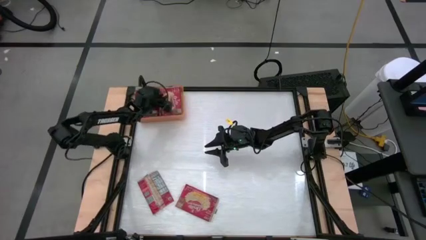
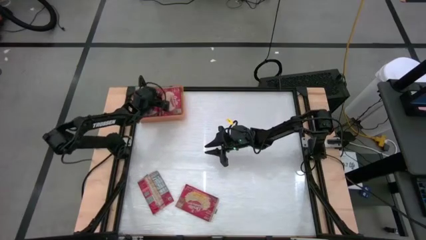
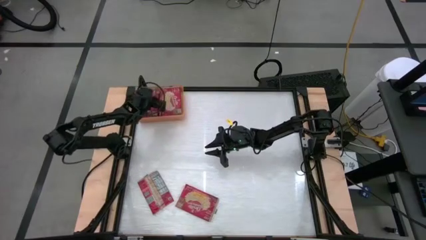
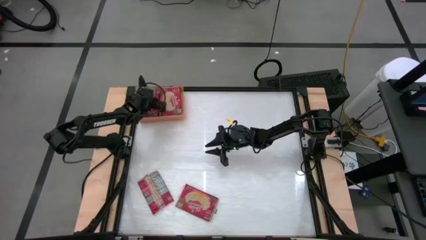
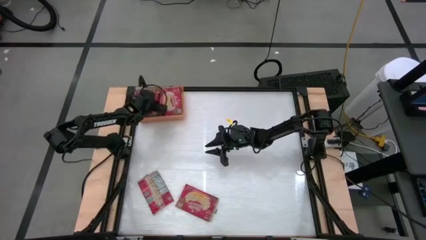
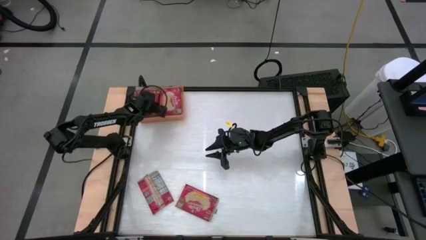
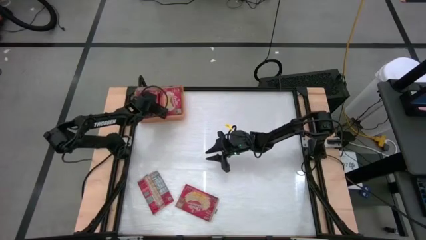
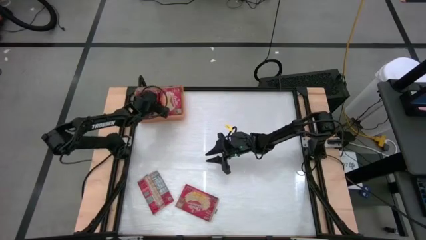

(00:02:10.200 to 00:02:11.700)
Task: Sort popcorn bags into baskets
Adjust the red popcorn bag in the orange bin

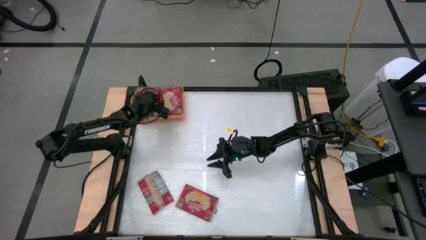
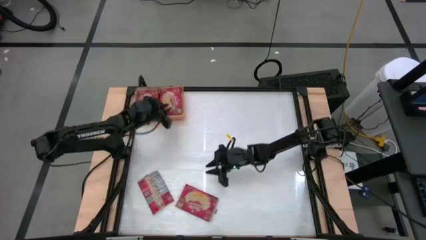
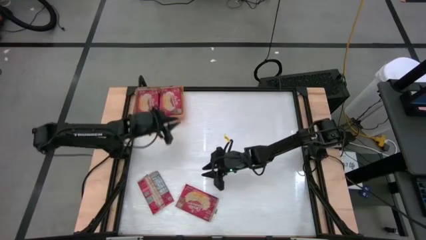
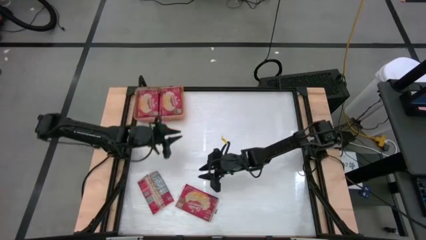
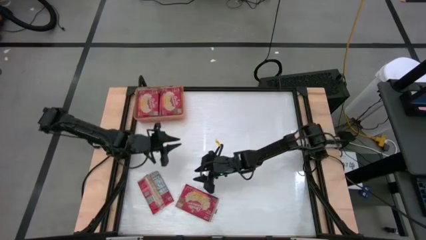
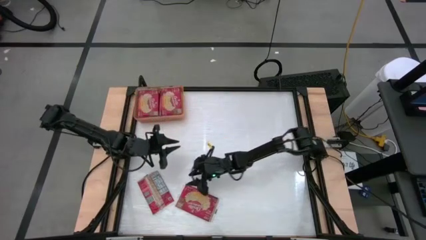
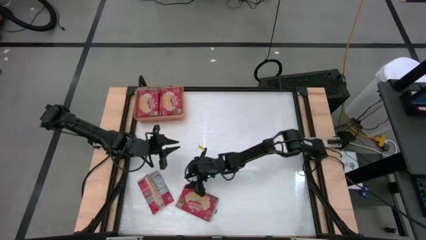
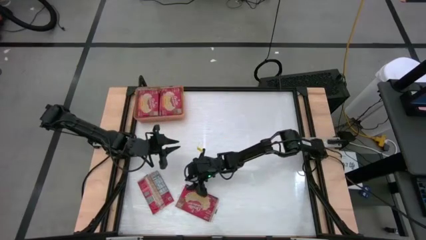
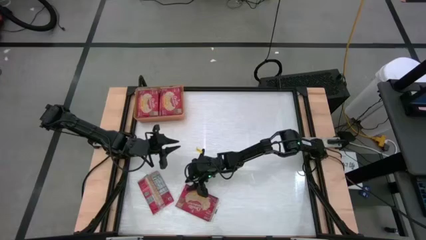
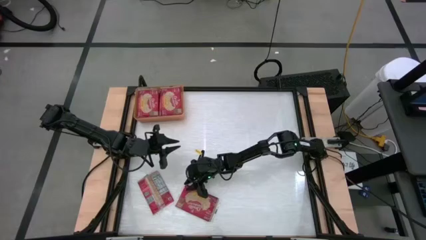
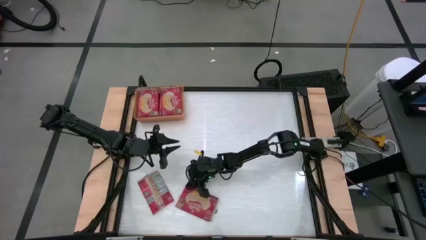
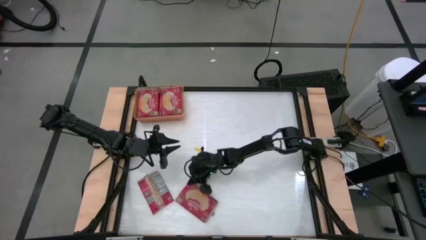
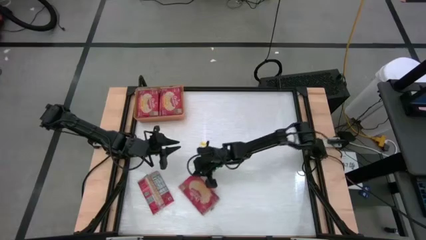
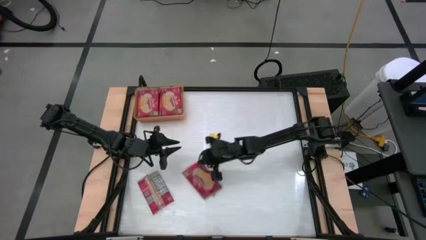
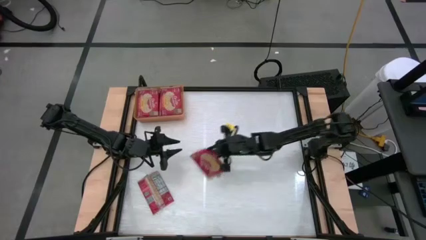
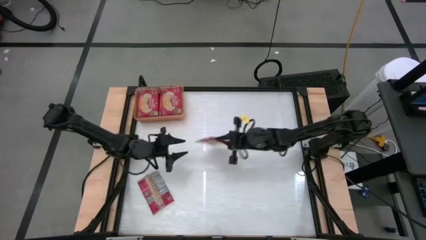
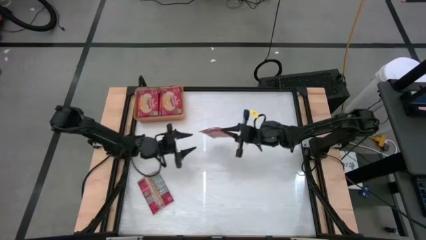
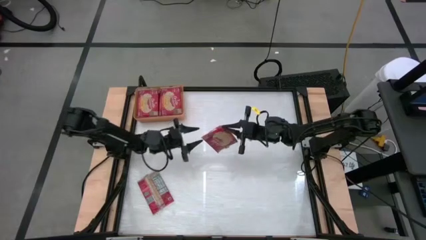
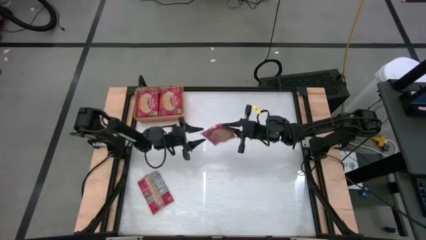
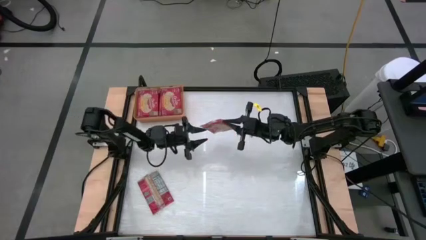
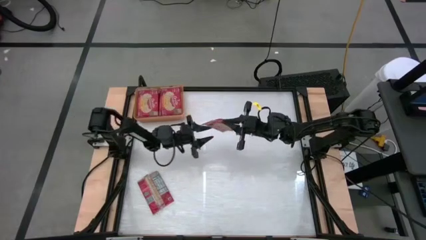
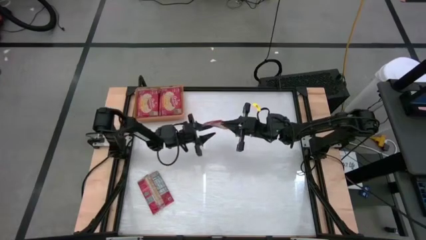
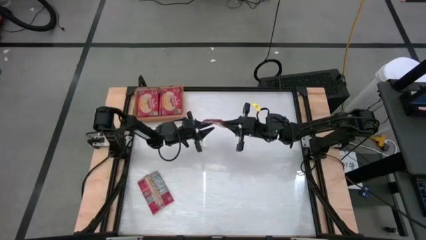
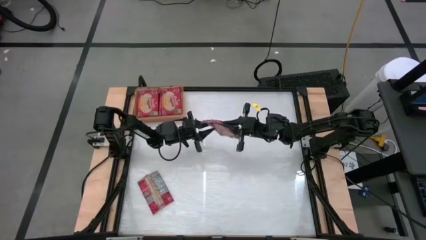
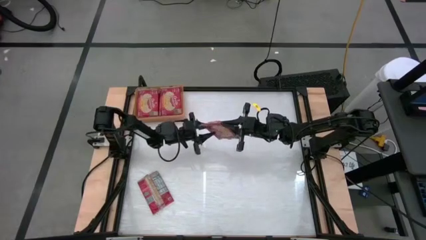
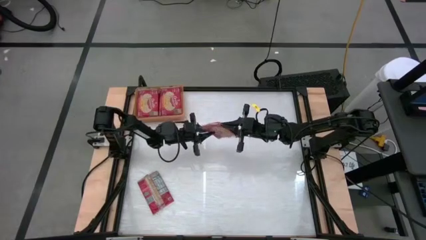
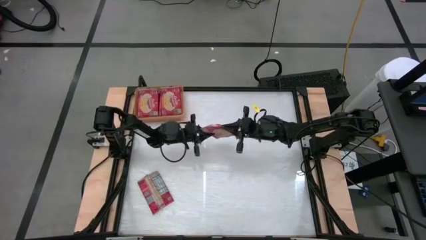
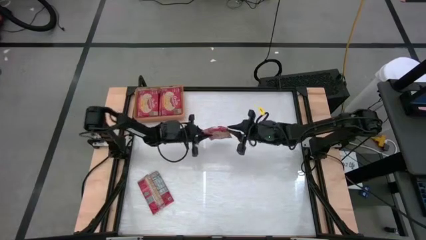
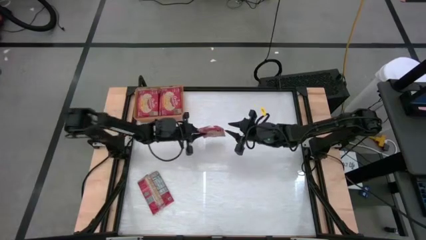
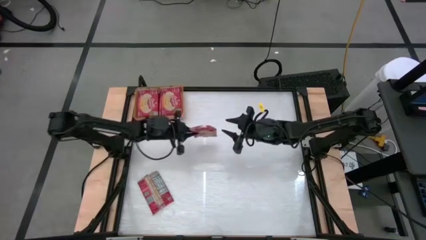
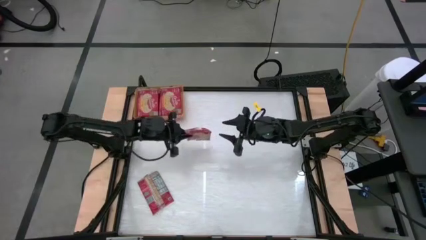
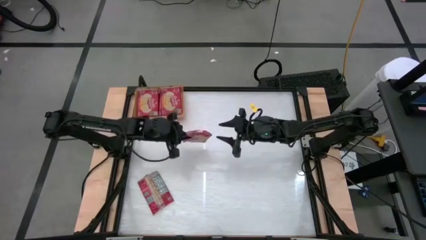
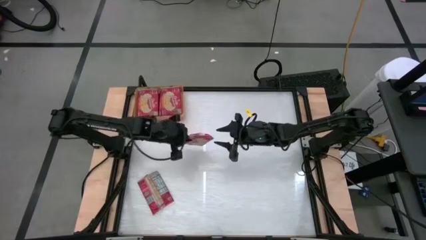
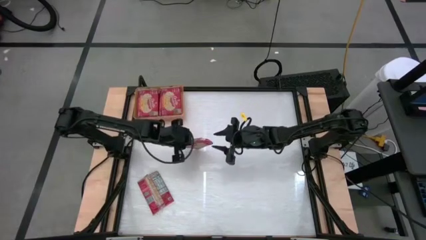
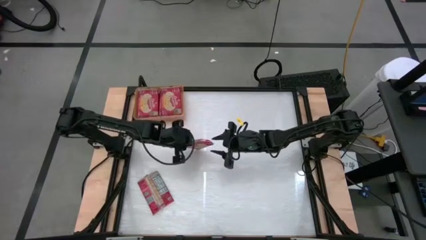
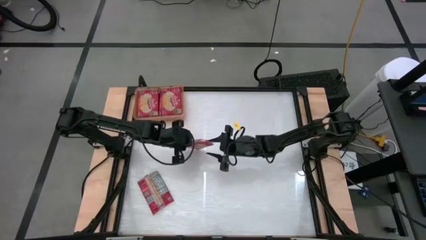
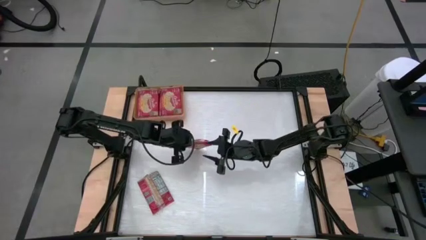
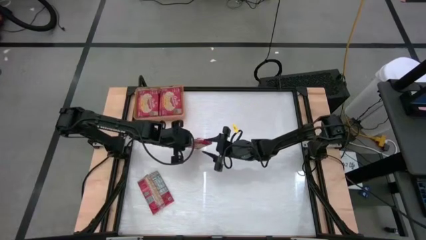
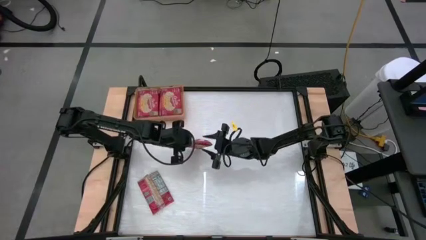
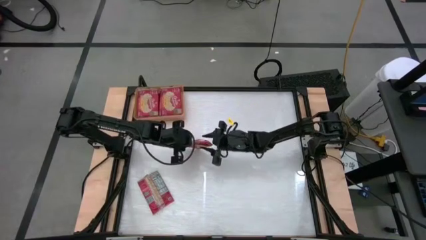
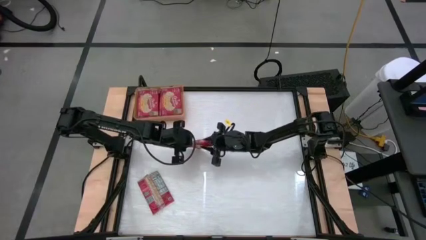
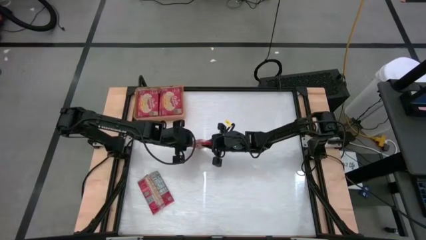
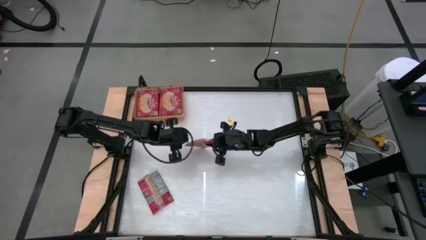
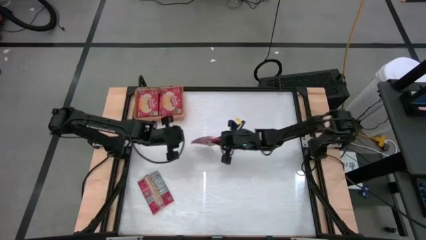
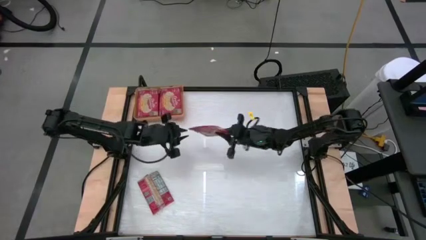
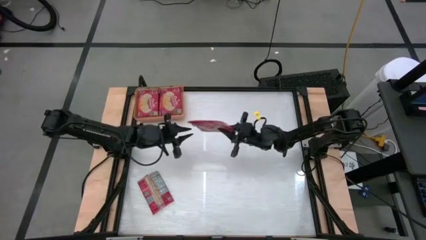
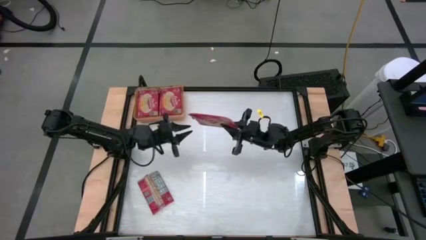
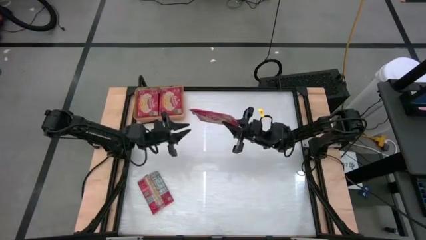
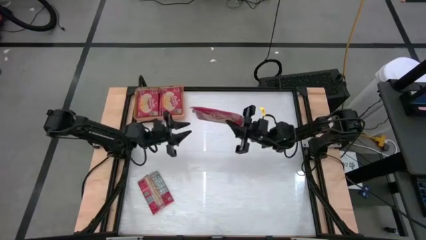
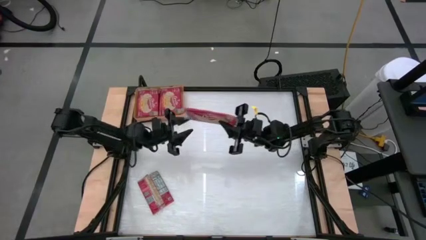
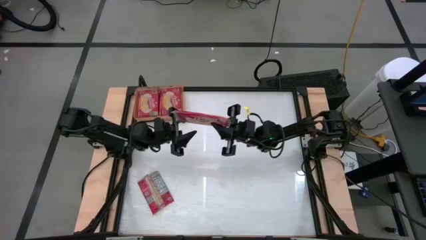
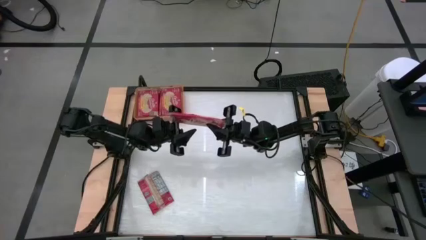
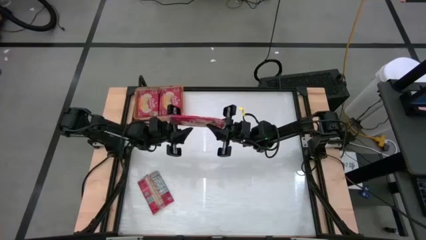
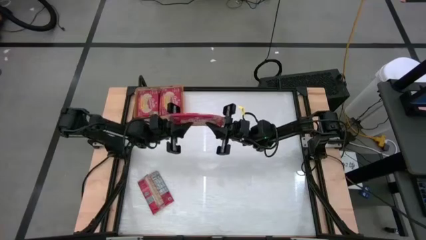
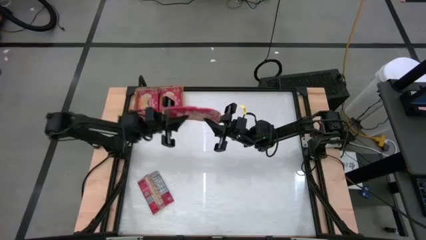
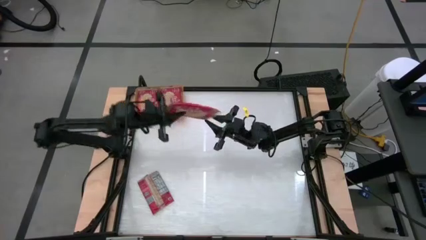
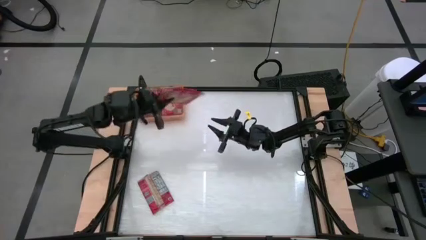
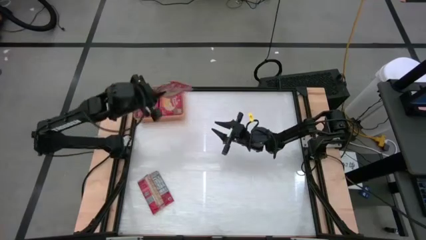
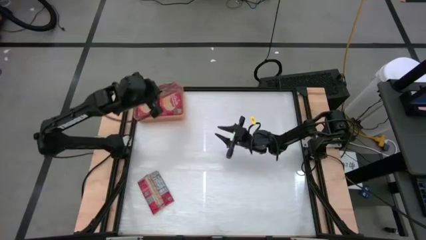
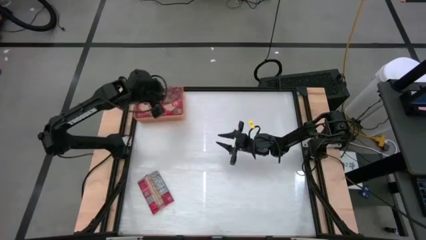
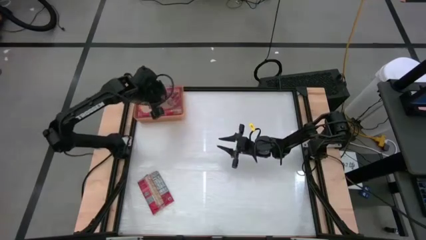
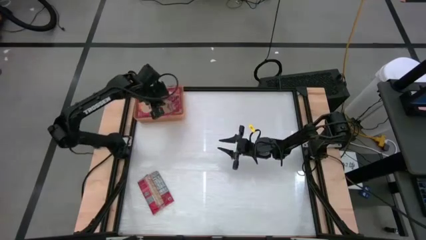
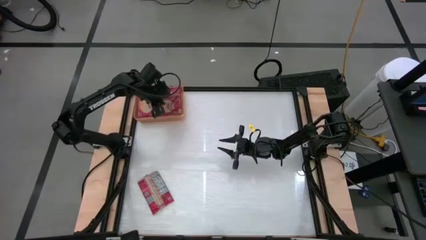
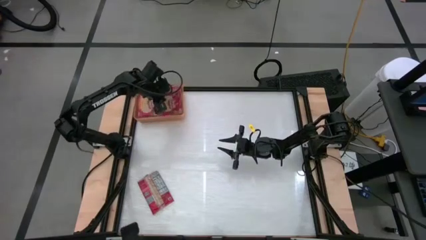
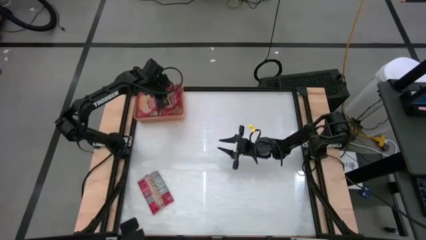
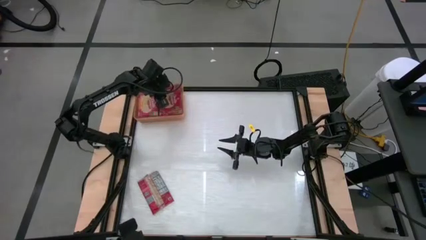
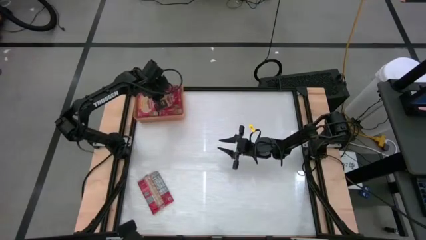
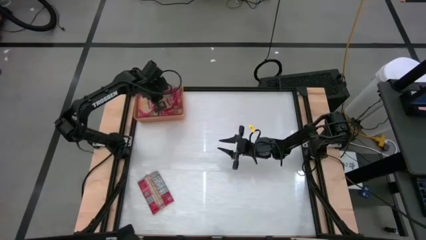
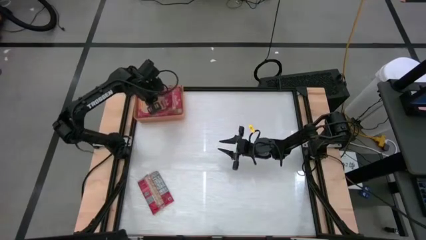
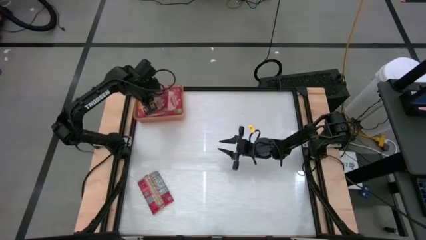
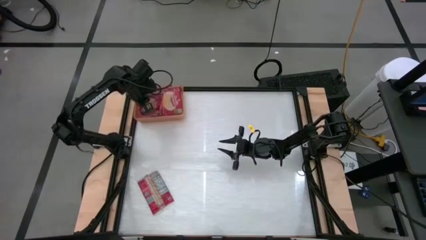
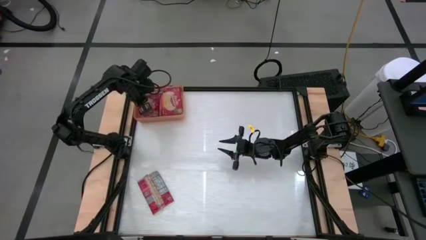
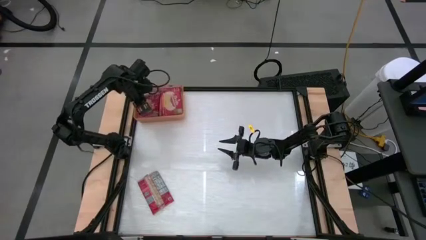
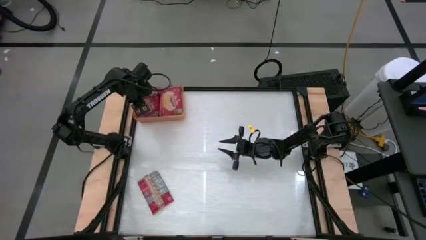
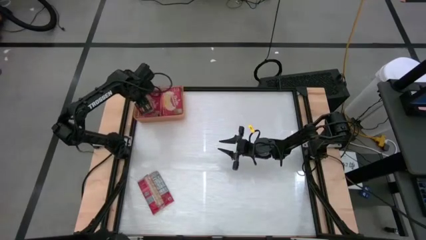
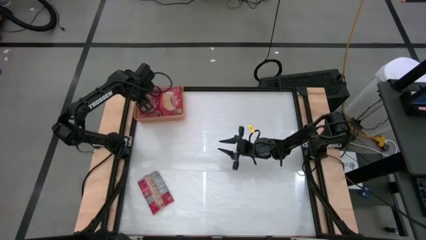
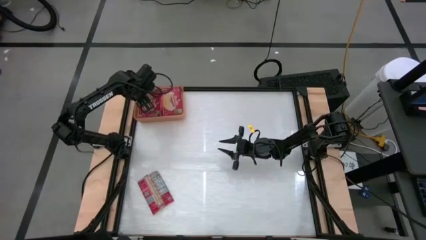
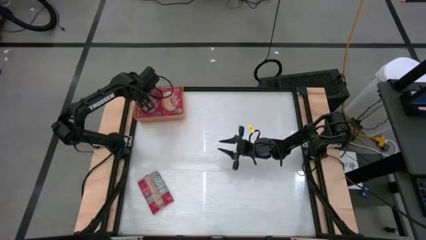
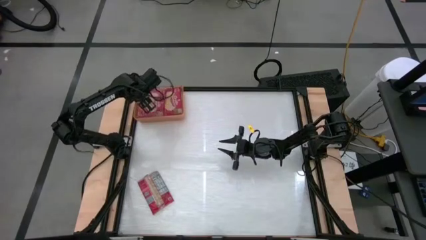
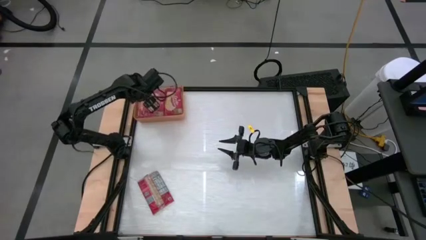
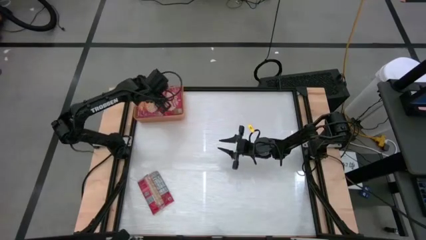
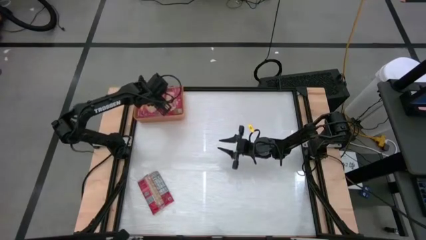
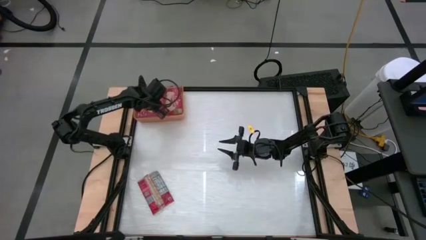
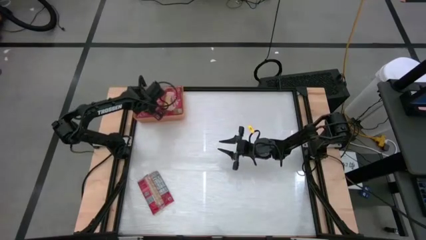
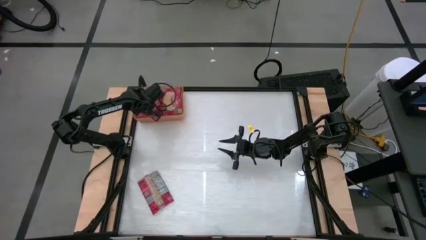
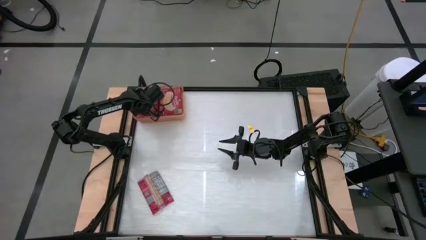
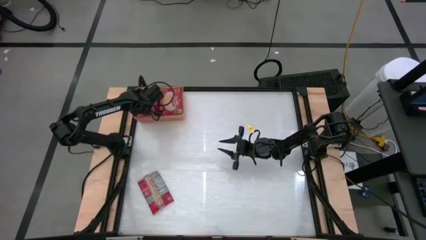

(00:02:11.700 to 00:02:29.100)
Put the red popcorn bag into the orange bin
